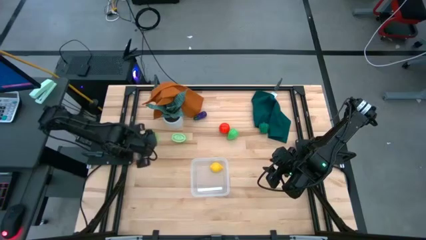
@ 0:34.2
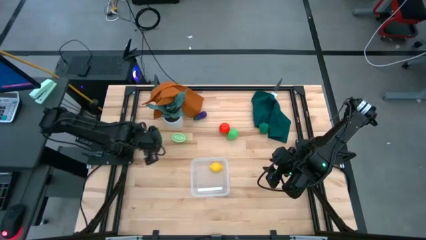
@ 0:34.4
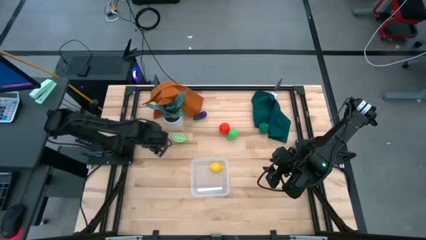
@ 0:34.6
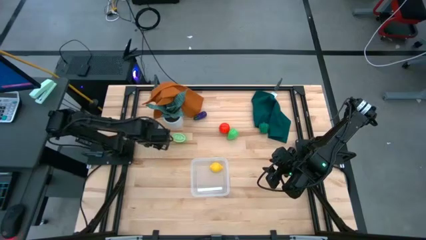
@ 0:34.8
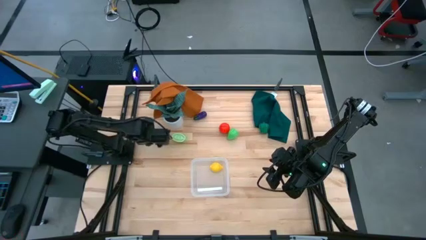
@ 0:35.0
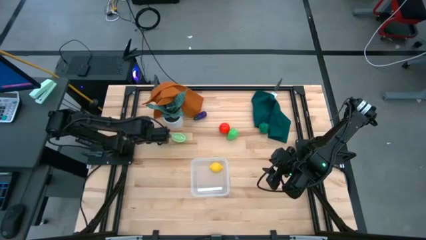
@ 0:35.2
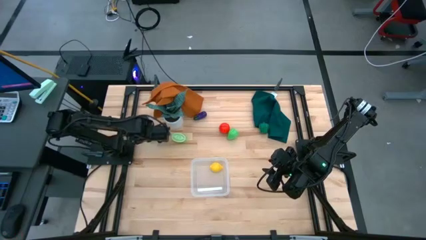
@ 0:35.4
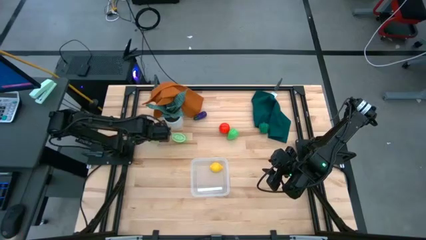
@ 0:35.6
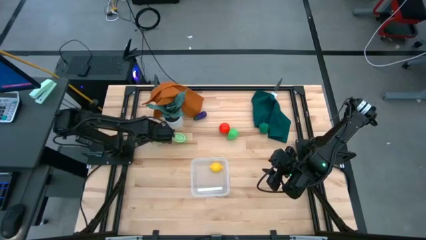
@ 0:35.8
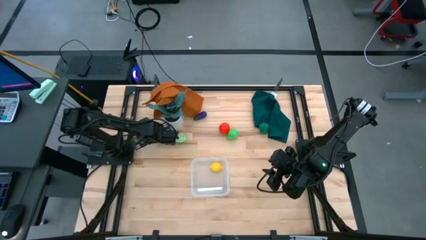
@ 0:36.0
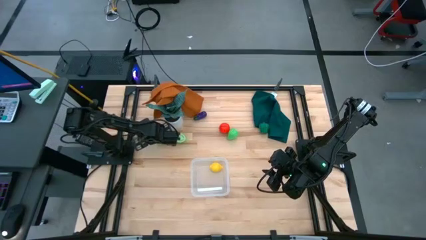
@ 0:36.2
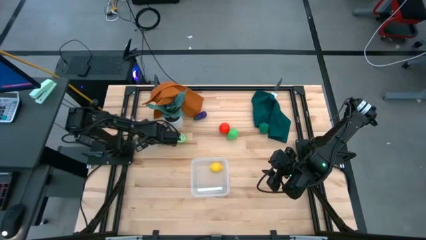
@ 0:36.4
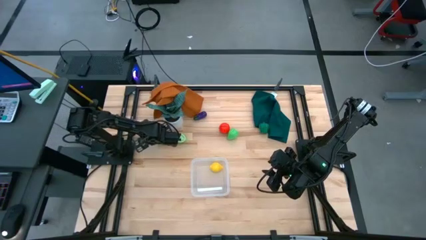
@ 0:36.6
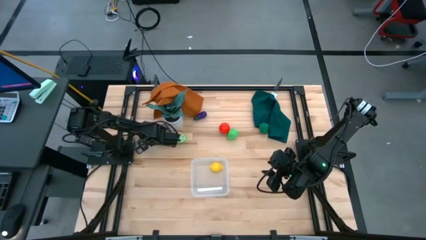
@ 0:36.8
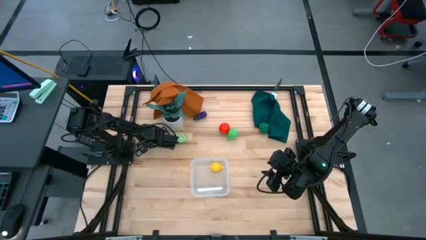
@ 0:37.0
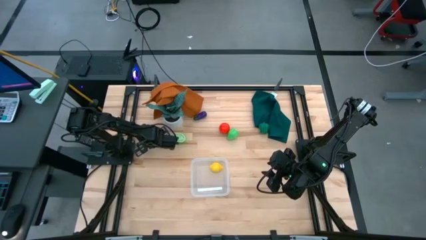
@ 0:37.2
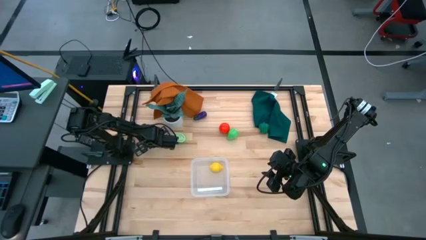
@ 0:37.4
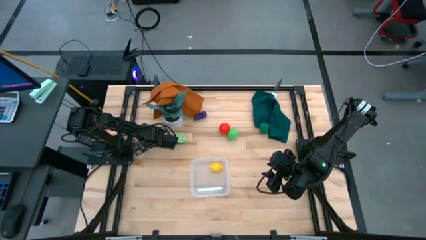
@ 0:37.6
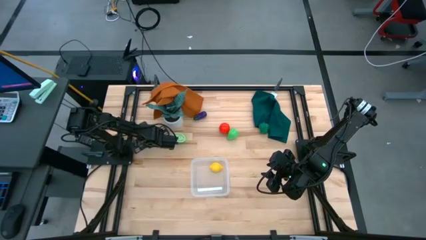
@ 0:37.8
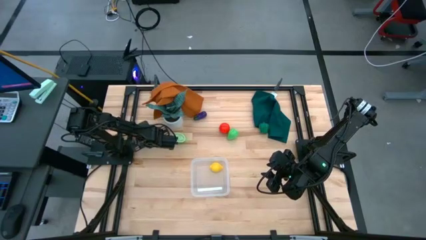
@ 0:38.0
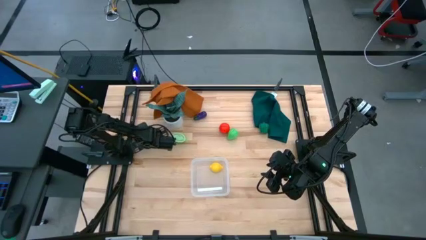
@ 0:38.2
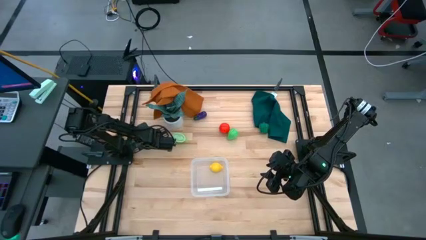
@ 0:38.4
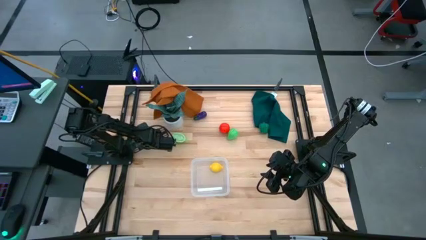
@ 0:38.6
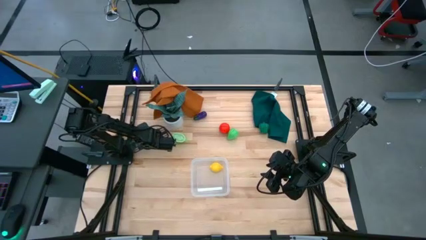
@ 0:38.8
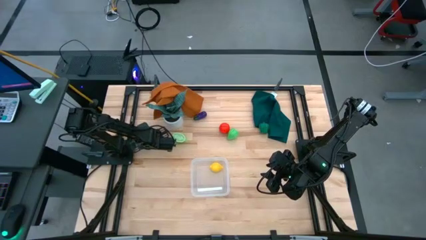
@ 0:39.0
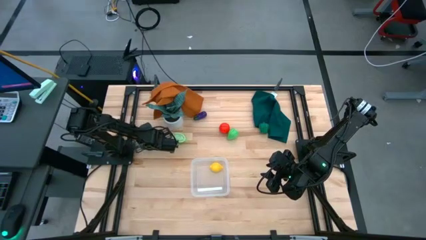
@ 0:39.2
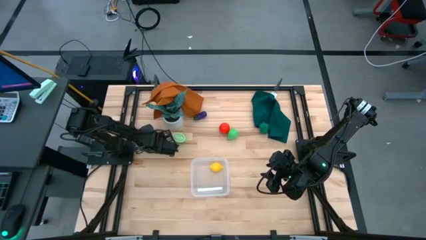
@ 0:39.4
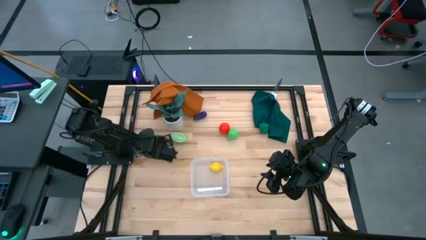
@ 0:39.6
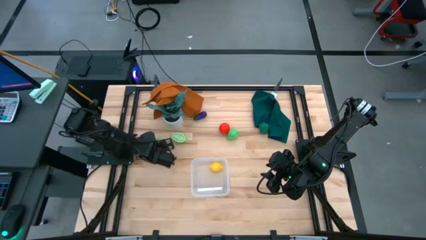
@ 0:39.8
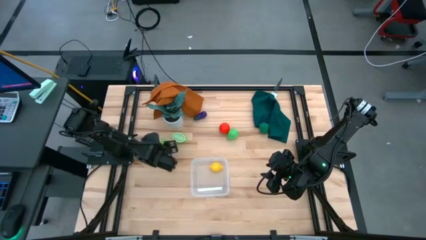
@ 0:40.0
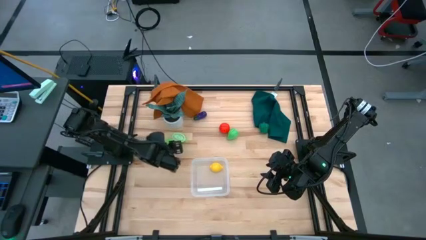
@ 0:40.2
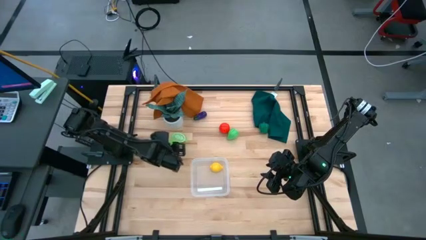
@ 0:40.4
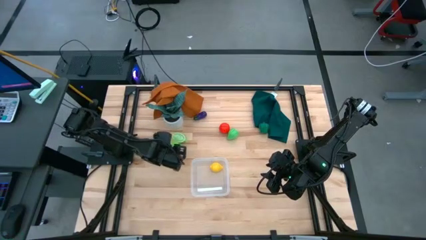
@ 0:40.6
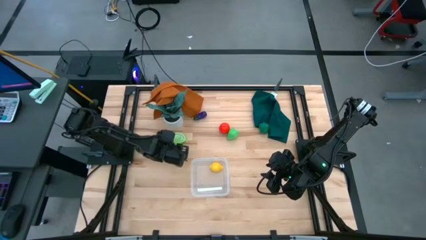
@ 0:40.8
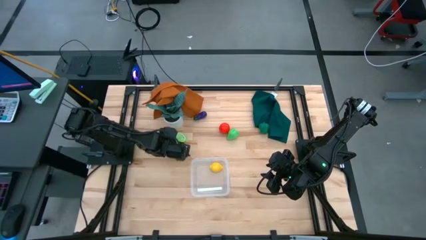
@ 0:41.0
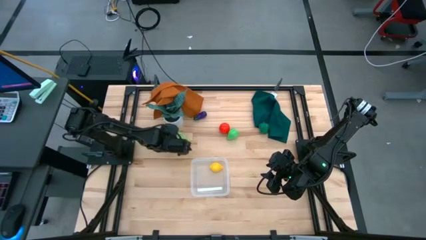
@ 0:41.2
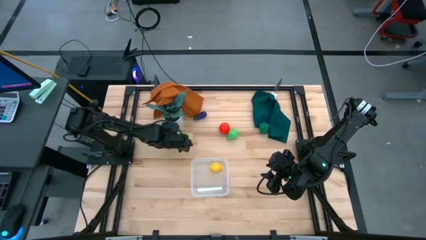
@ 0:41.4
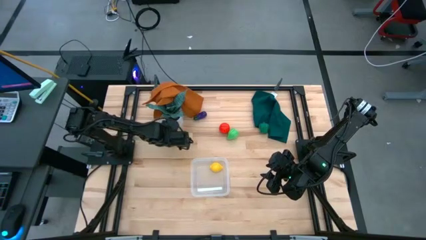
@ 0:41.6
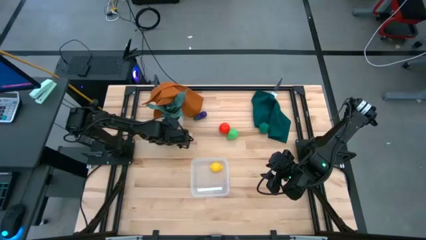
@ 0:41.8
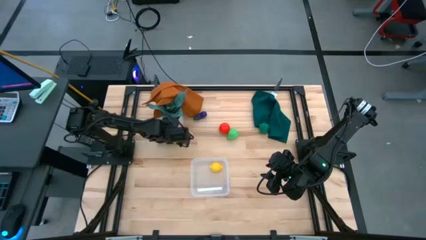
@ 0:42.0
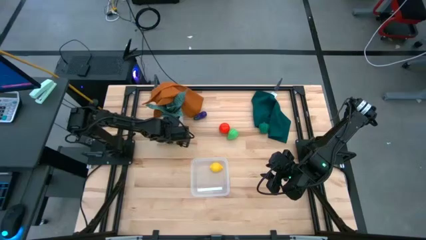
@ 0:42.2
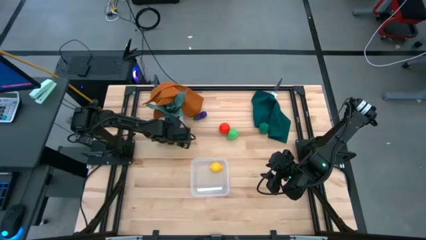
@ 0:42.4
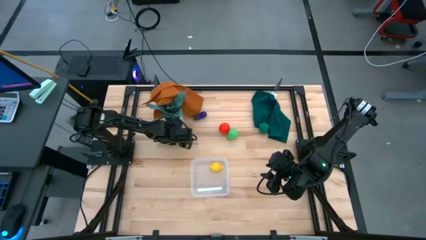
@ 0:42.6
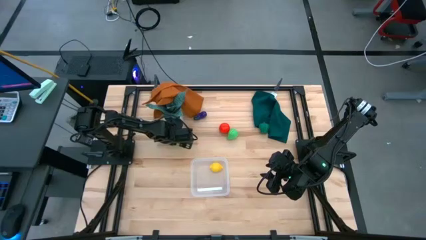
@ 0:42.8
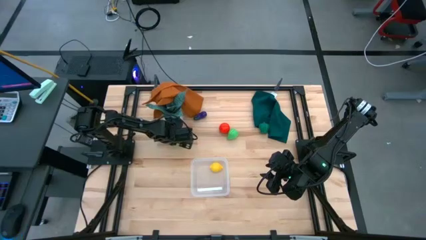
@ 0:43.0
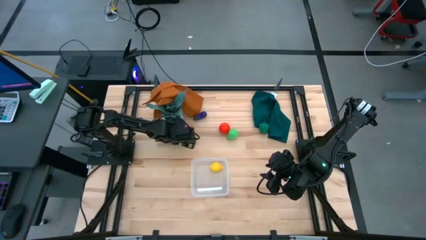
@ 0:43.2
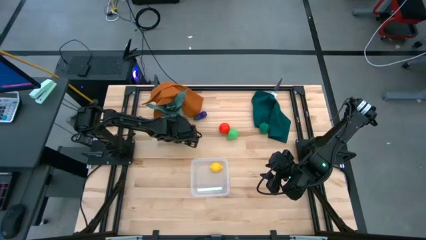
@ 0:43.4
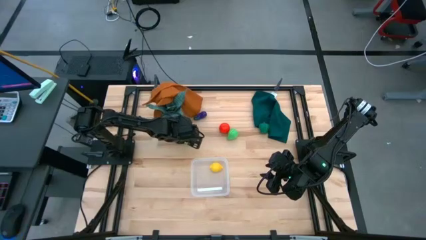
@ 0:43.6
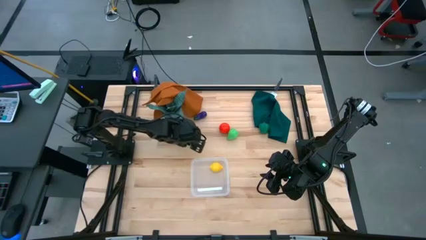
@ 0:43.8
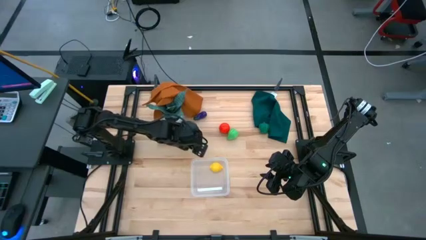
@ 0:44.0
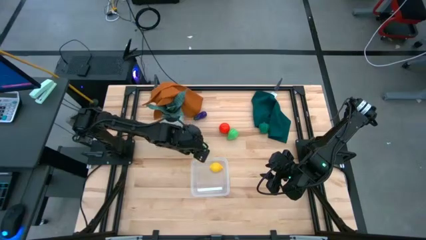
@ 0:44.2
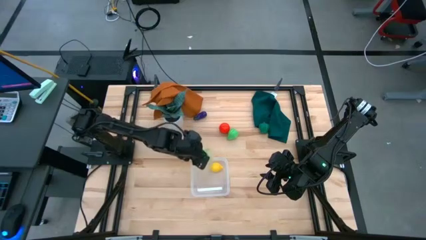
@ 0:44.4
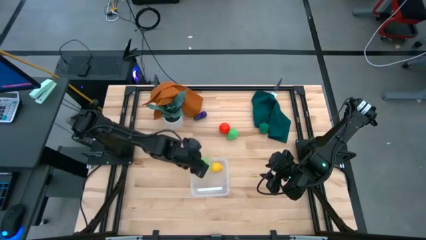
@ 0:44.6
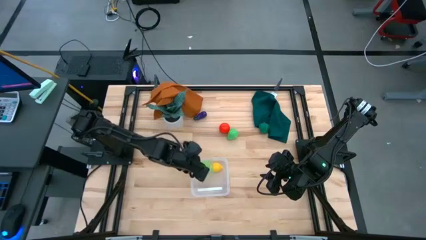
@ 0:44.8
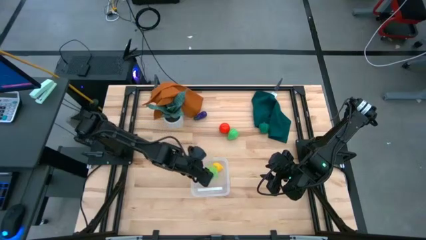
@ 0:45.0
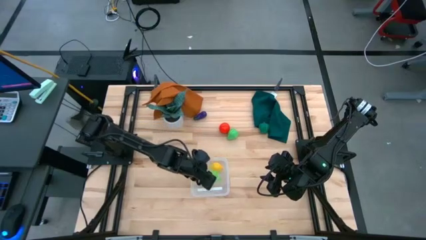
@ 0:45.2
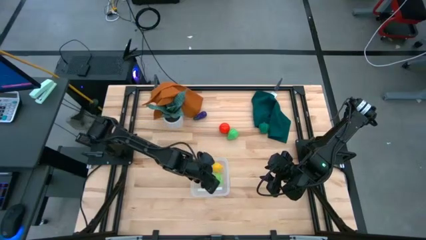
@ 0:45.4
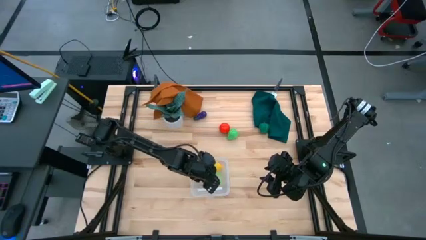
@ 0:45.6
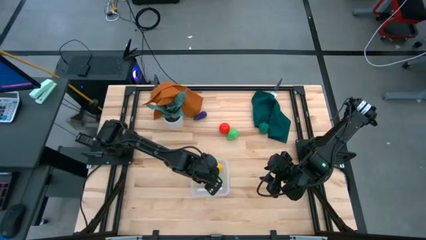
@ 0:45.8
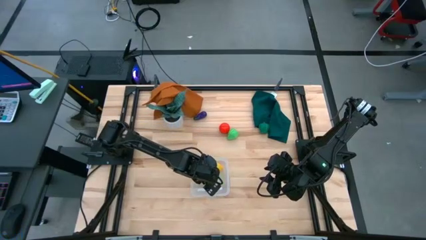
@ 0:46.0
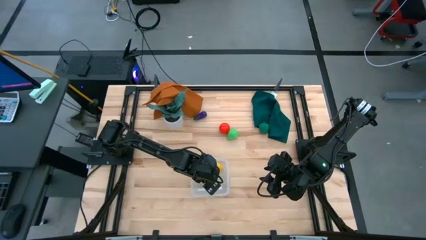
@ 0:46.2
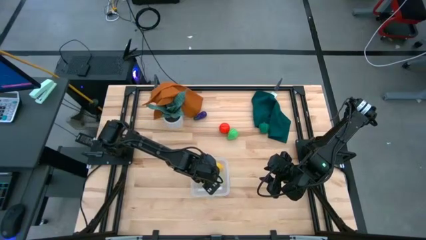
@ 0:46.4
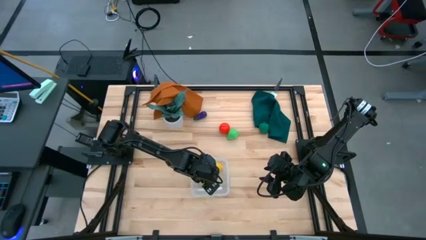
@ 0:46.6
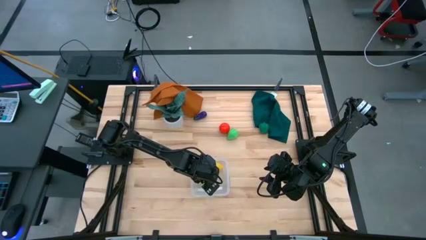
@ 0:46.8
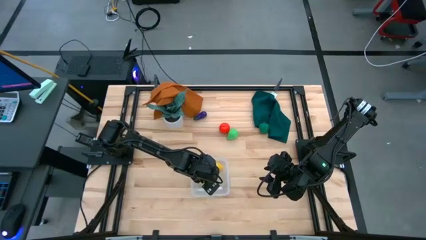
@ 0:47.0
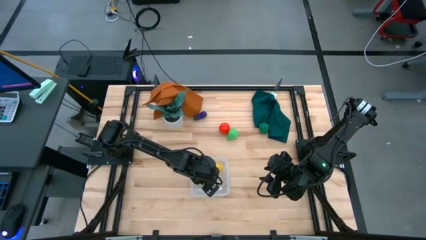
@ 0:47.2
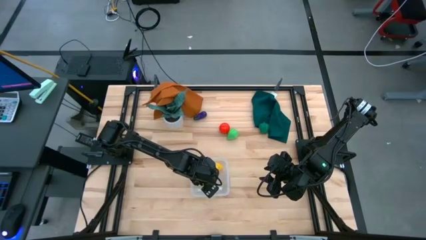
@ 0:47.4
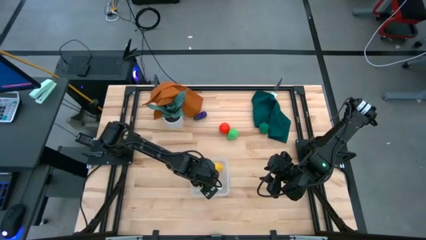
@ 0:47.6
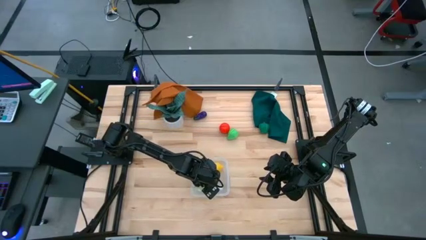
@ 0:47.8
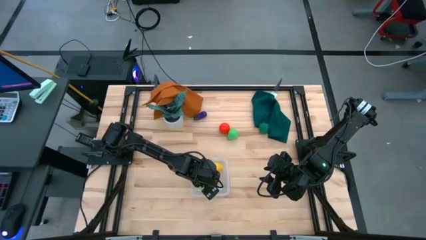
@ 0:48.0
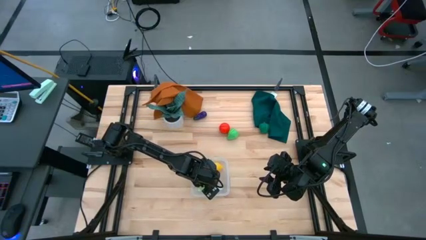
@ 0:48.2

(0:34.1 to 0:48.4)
Task: Pick and placing Produce into tupperware
Put the melon into the transparent bin
